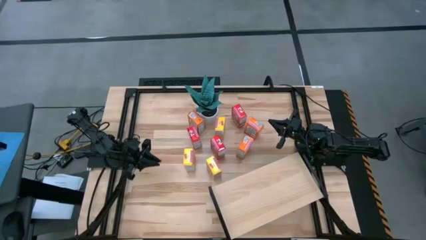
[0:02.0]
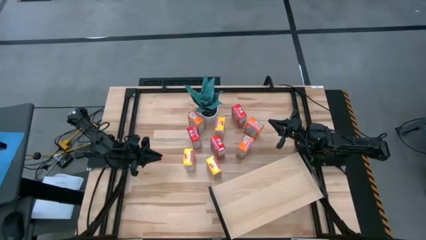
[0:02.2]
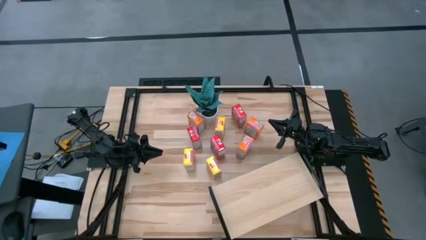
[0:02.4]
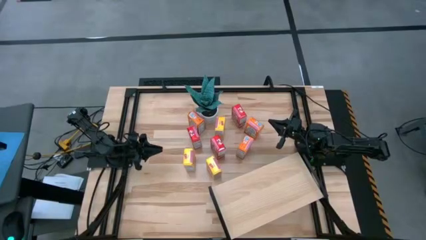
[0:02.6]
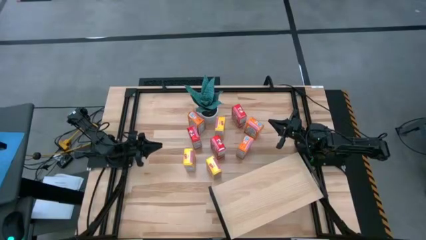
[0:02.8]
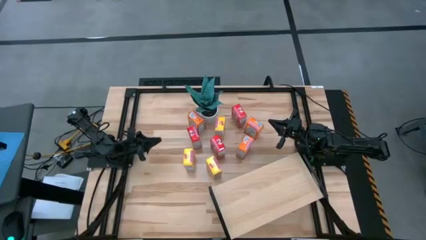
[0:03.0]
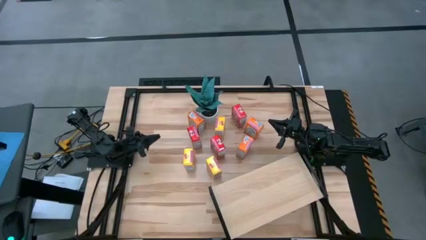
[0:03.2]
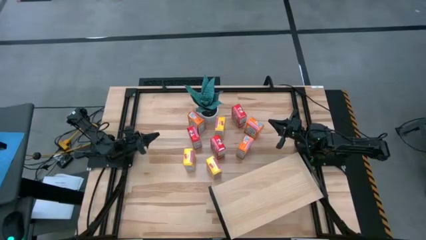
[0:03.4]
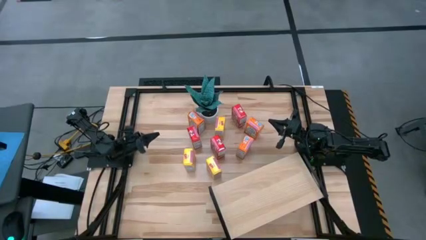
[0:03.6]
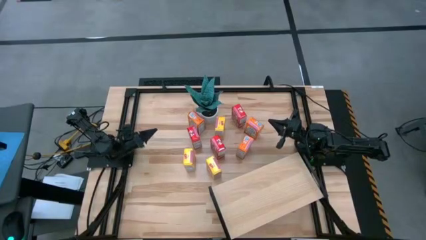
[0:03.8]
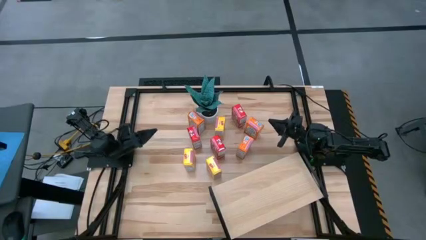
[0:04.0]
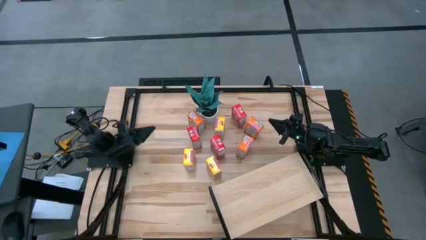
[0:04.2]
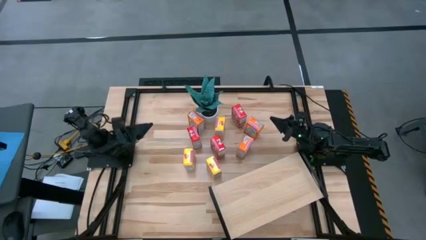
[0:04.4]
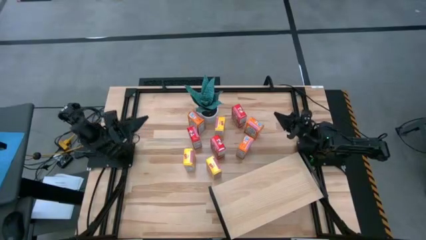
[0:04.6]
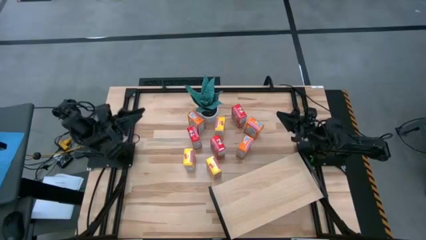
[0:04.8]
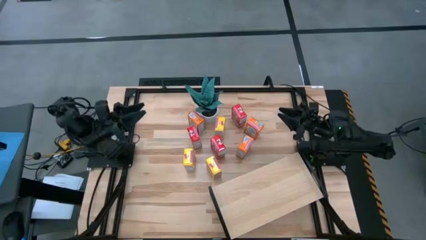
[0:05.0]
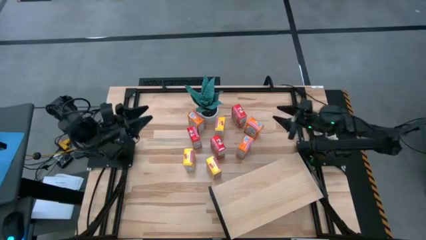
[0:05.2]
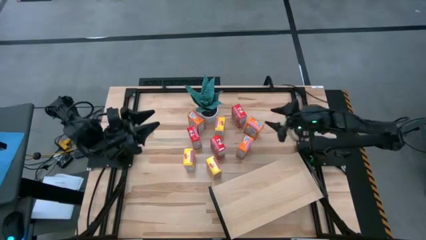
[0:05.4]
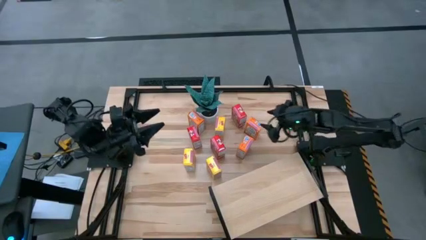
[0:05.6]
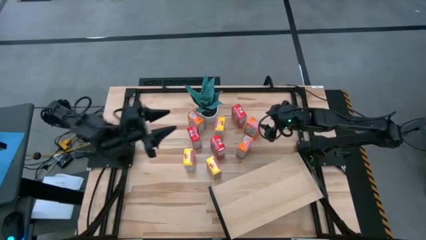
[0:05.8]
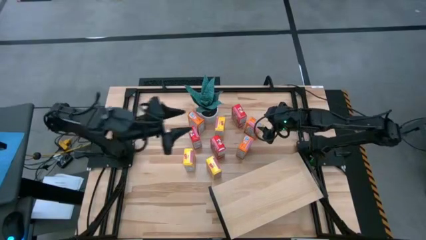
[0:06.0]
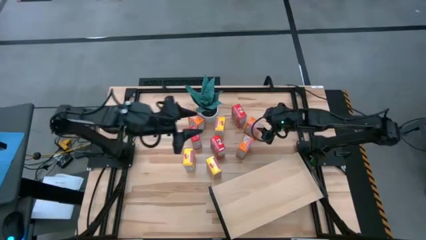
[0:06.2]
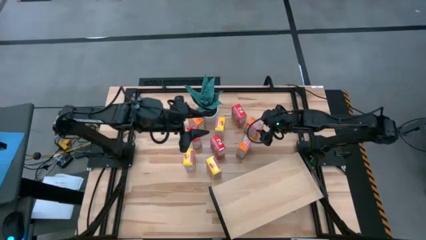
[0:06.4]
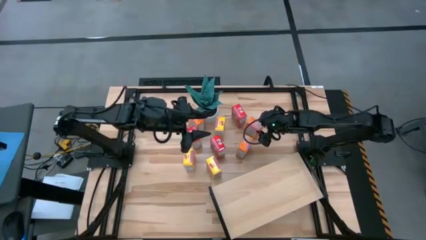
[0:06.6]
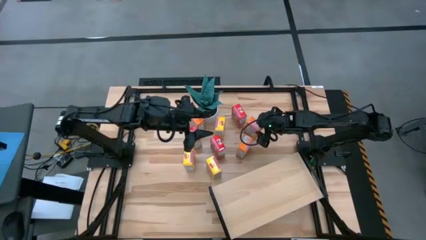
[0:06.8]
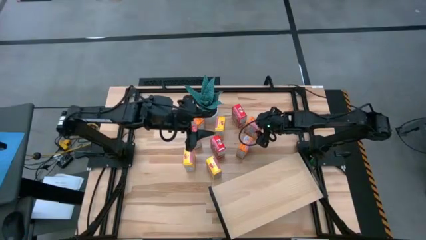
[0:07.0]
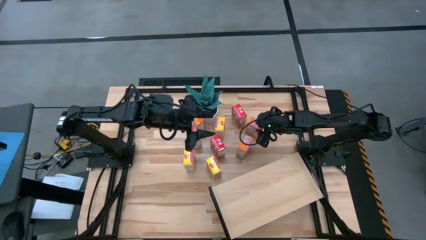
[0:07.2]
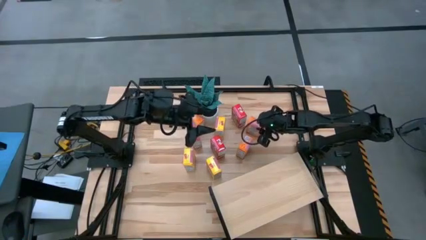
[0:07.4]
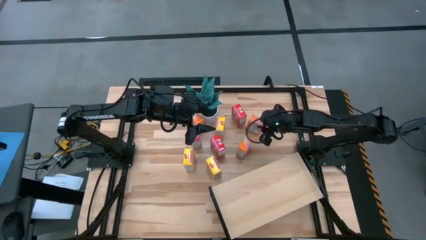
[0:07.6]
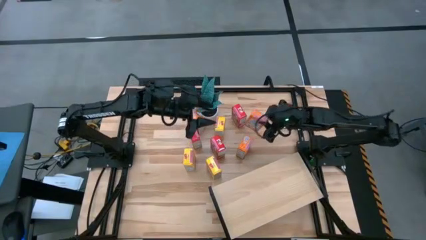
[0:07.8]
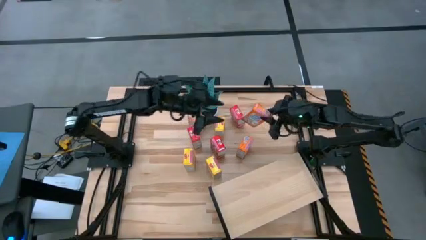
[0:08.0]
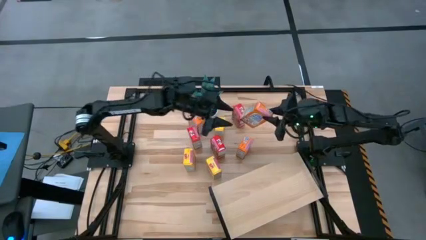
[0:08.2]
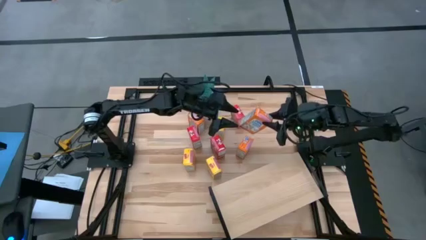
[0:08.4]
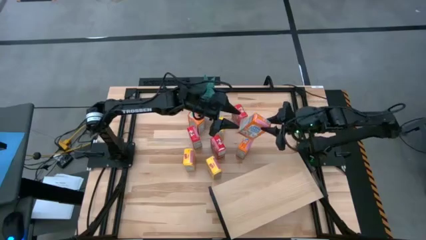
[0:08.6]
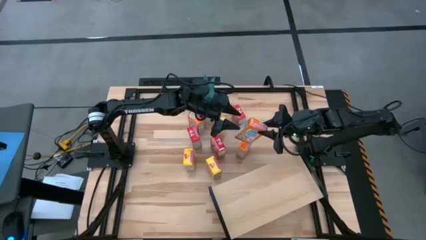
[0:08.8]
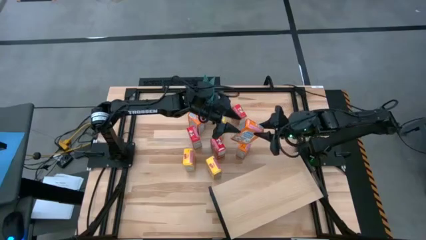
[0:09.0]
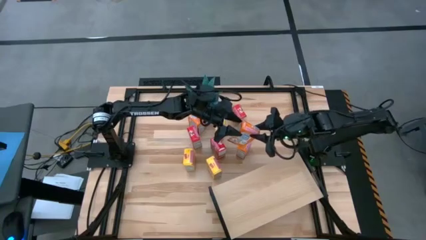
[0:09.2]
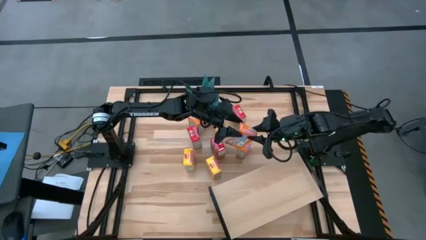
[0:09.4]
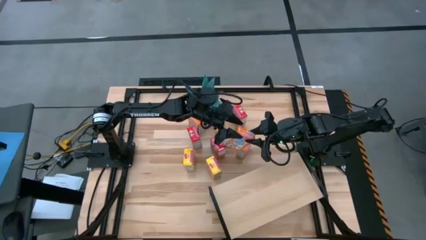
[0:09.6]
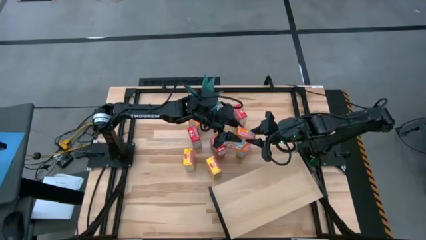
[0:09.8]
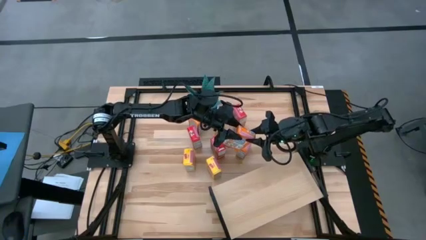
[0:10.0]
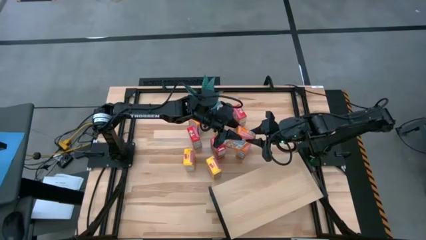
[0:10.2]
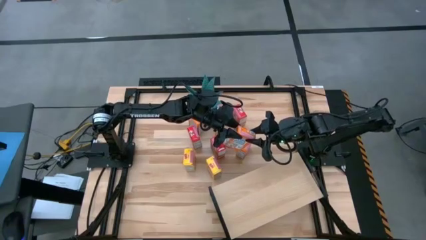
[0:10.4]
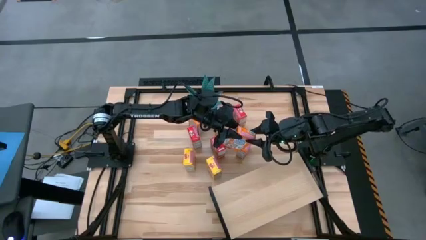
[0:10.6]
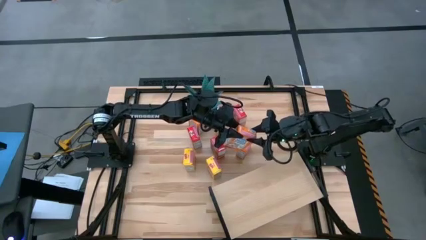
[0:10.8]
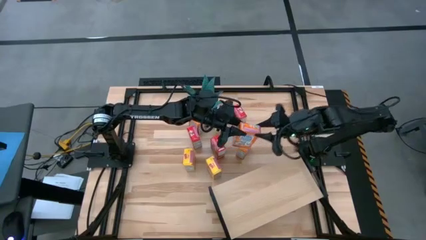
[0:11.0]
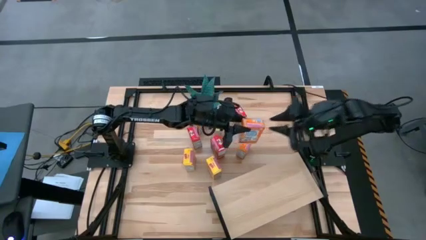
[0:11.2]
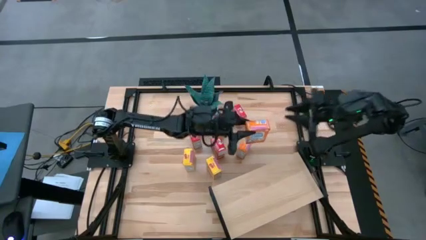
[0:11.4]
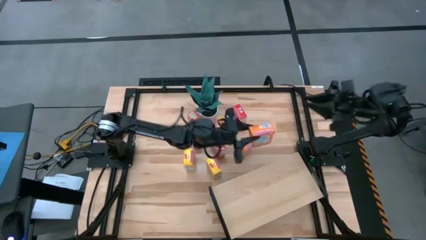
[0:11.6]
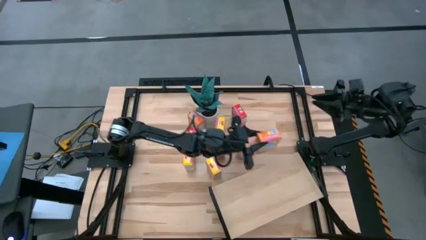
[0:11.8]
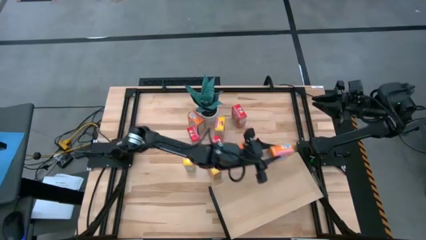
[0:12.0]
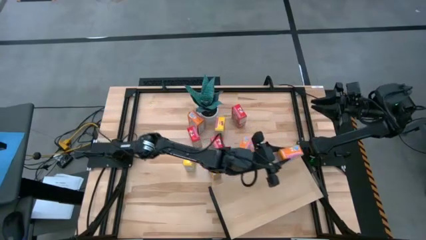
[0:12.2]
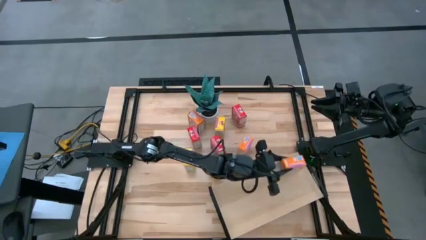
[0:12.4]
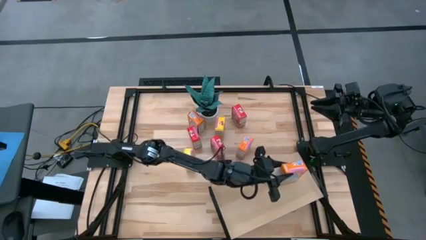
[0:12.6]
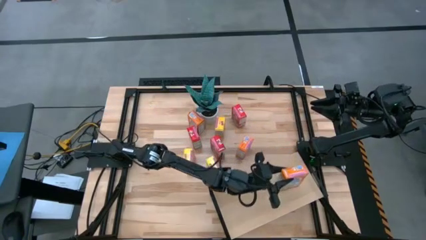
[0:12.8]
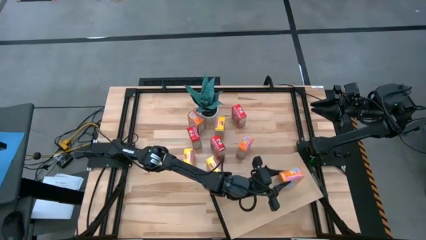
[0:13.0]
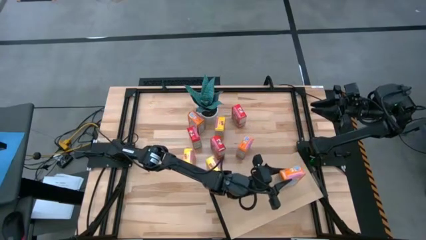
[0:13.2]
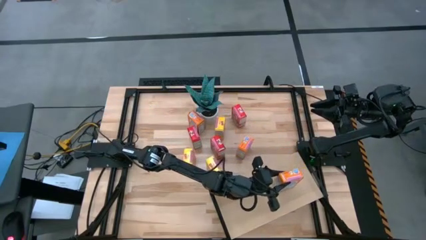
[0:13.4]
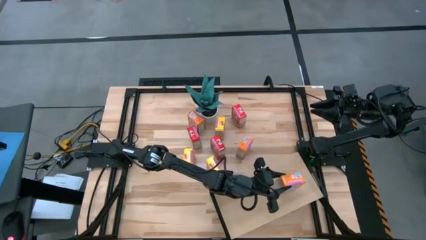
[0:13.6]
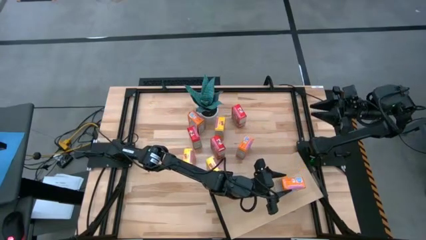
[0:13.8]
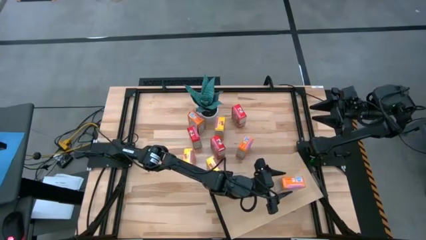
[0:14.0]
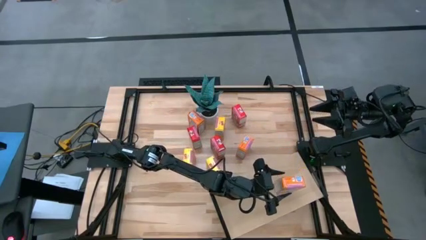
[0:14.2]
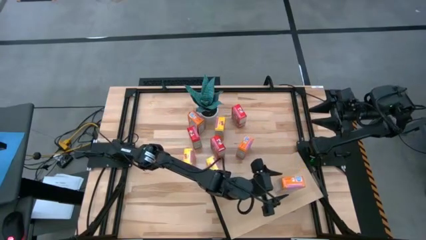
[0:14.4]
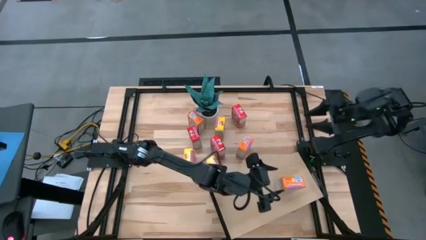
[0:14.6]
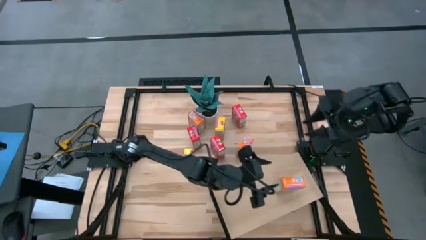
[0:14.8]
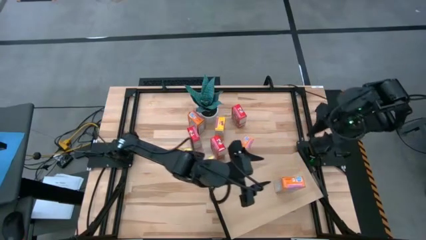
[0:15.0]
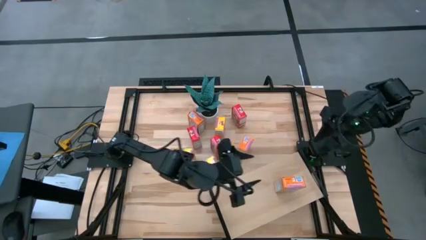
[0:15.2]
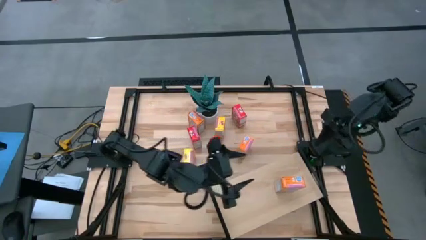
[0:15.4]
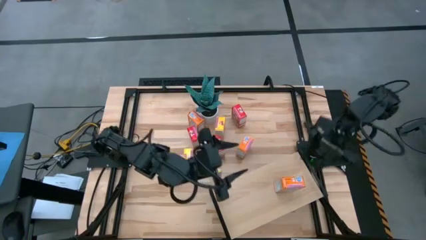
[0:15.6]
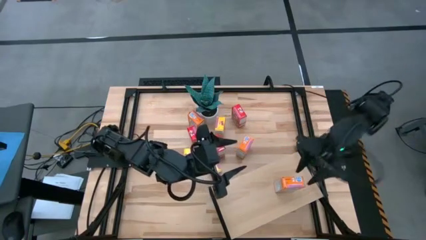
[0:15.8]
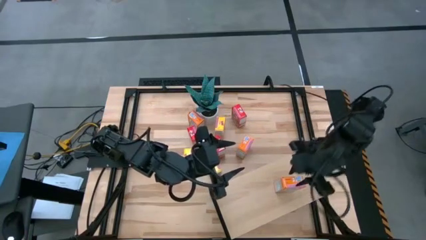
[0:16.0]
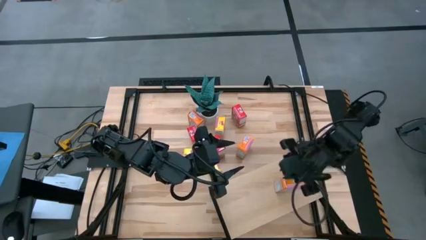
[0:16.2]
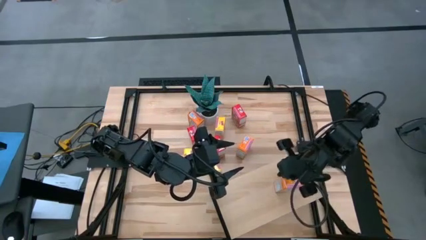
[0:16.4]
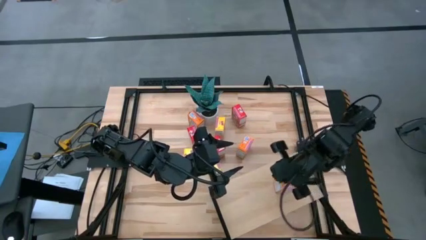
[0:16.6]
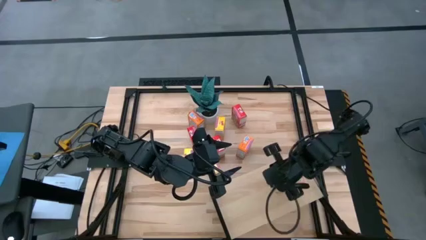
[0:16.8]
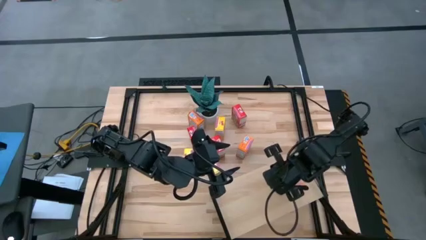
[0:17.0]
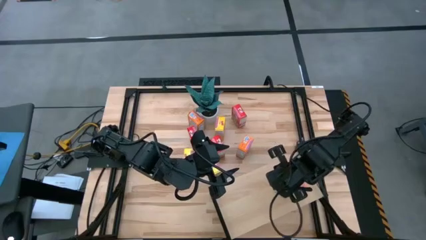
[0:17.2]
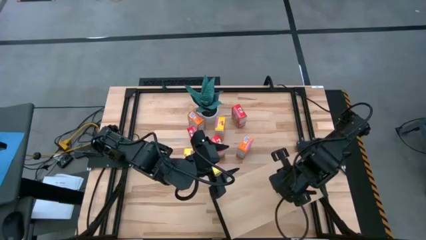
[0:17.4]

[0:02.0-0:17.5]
Task: Stack cereal on shelf
Put the top right orange cereal box on the shelf
